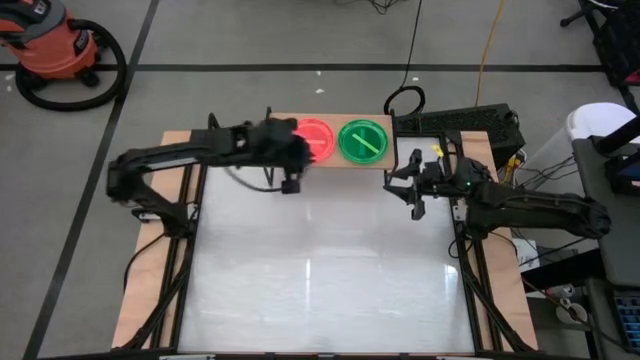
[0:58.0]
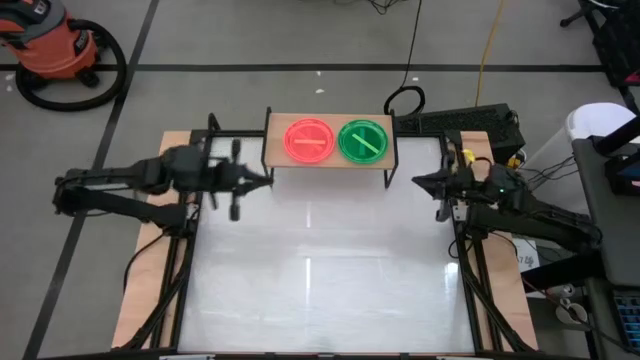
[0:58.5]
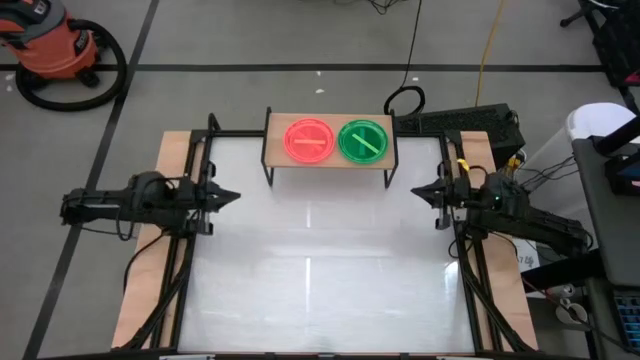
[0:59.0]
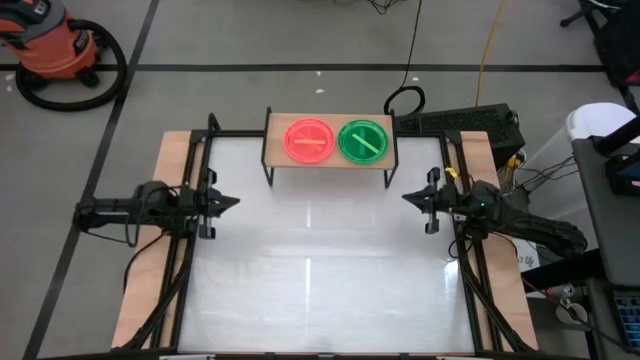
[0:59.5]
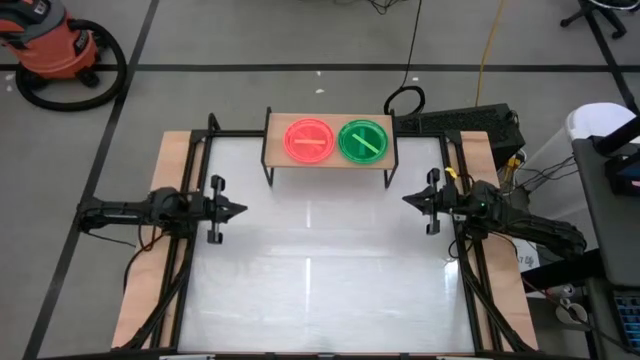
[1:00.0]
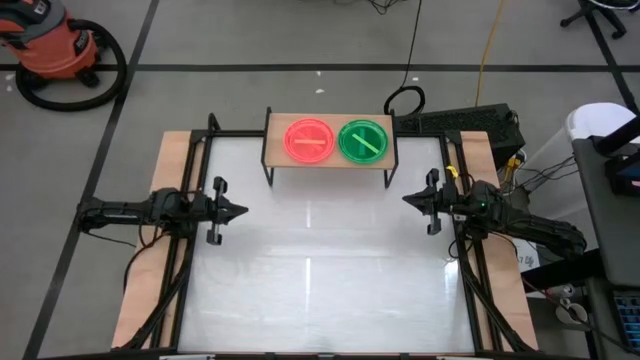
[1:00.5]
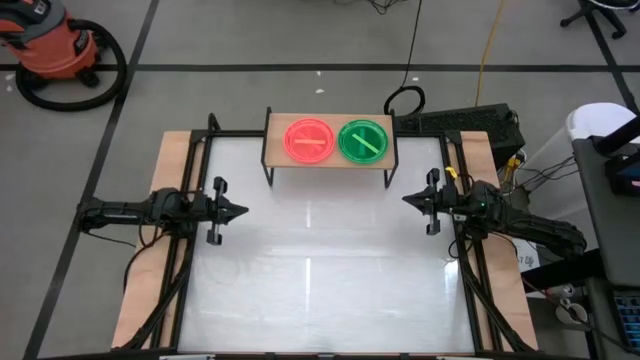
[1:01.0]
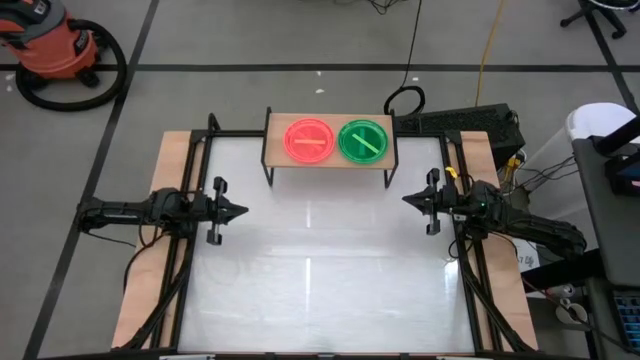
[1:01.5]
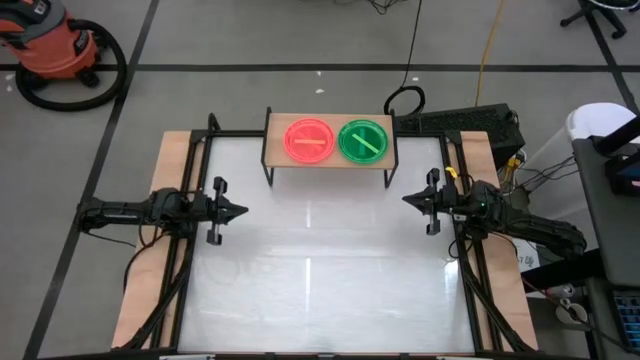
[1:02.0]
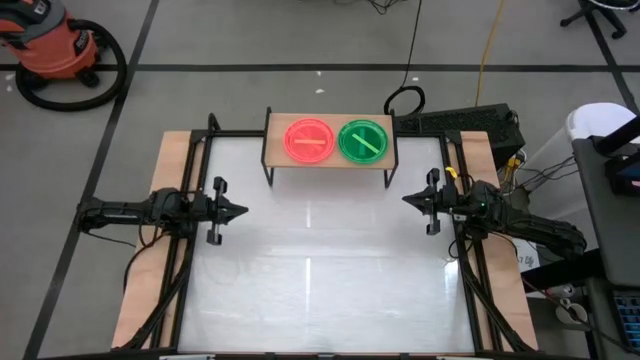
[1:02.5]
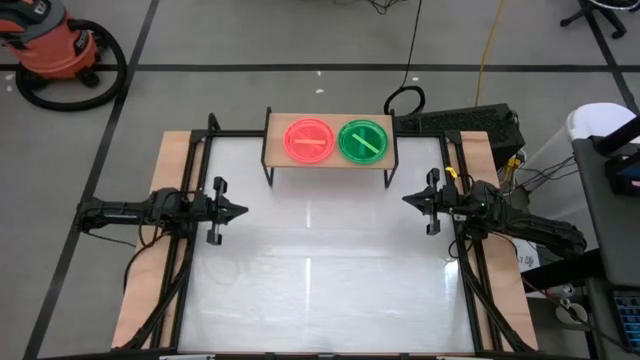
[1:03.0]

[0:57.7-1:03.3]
Task: Place and stack plates onto a shelf
Return to Home Position

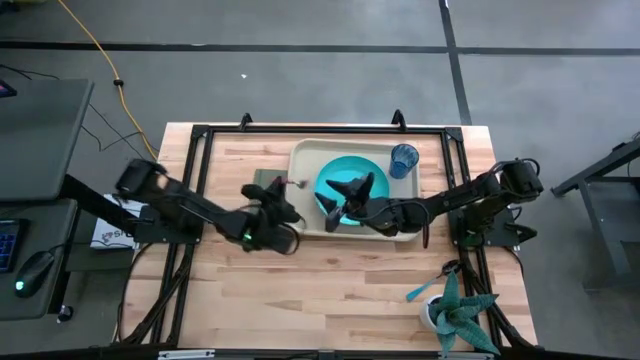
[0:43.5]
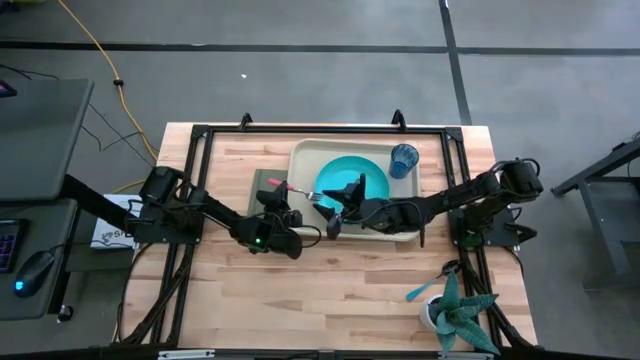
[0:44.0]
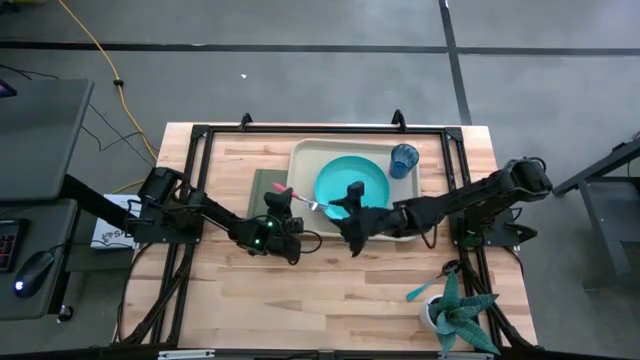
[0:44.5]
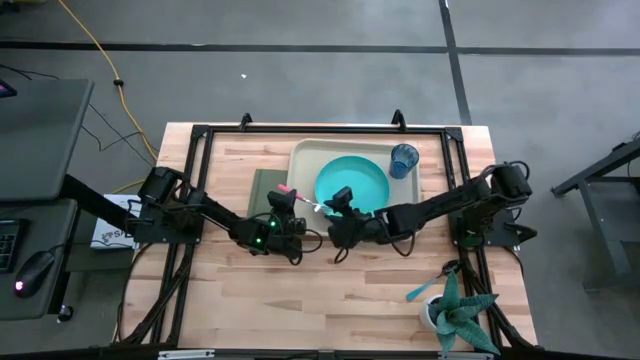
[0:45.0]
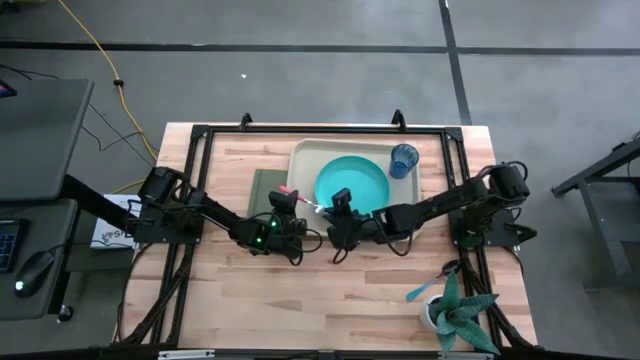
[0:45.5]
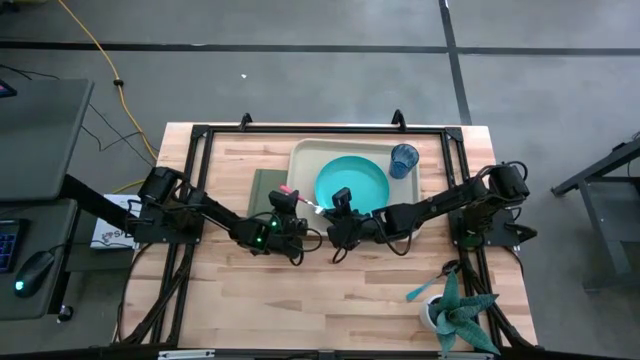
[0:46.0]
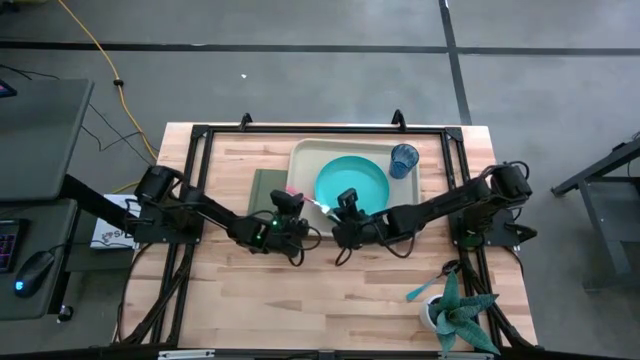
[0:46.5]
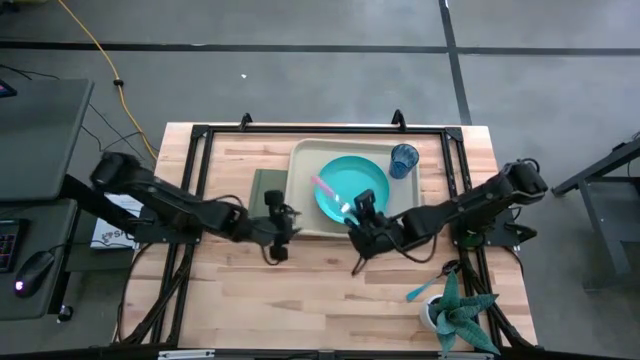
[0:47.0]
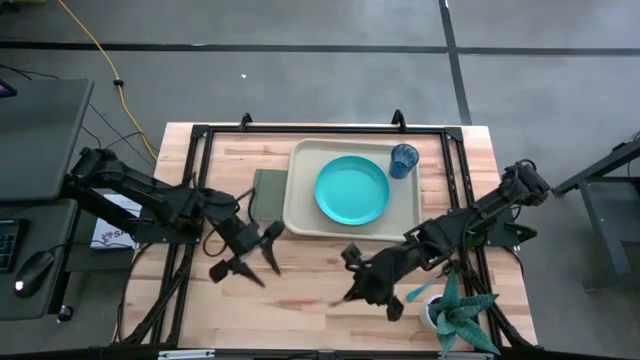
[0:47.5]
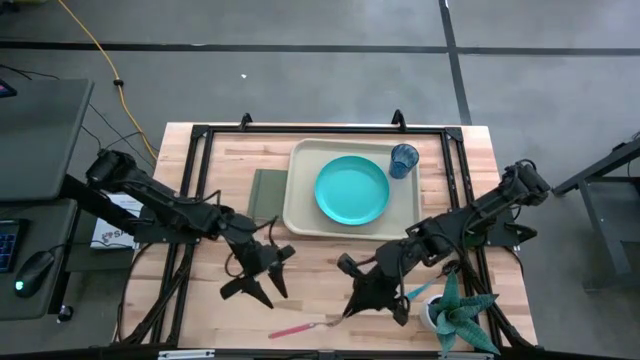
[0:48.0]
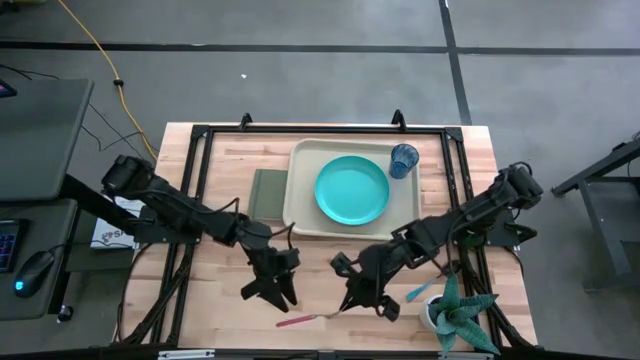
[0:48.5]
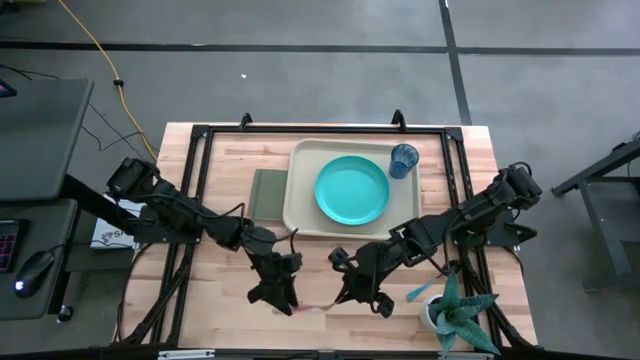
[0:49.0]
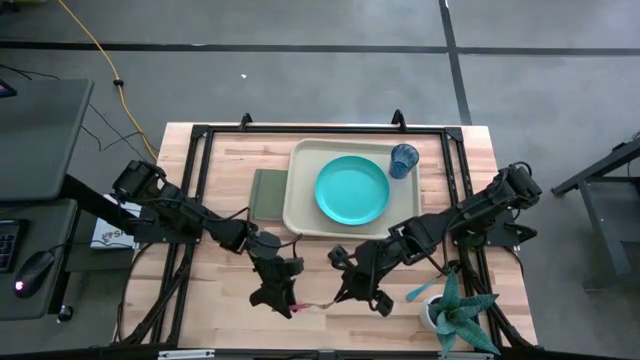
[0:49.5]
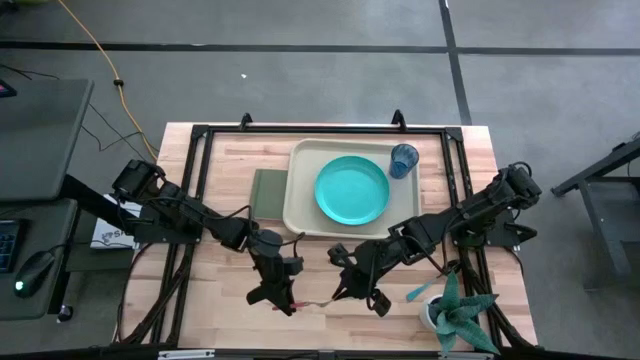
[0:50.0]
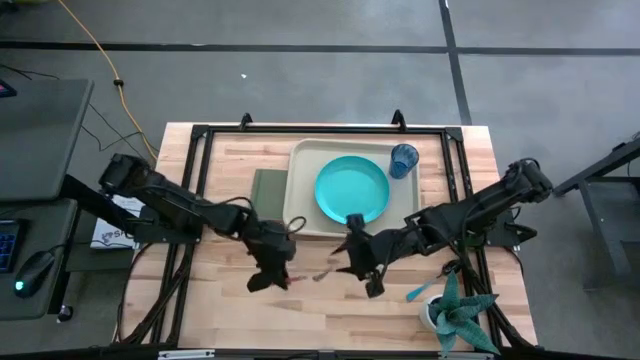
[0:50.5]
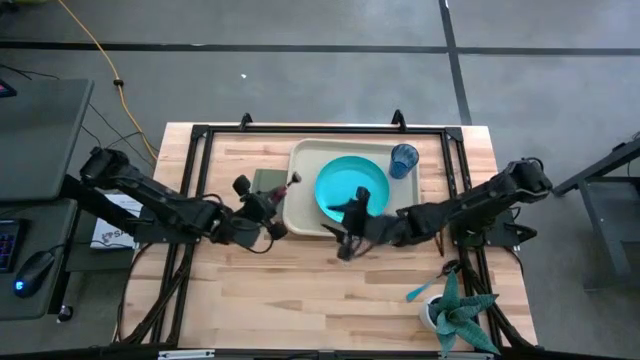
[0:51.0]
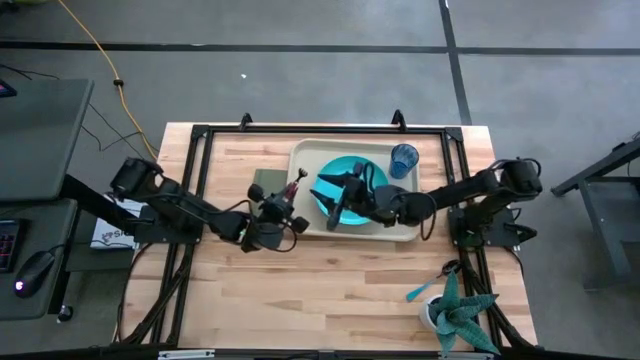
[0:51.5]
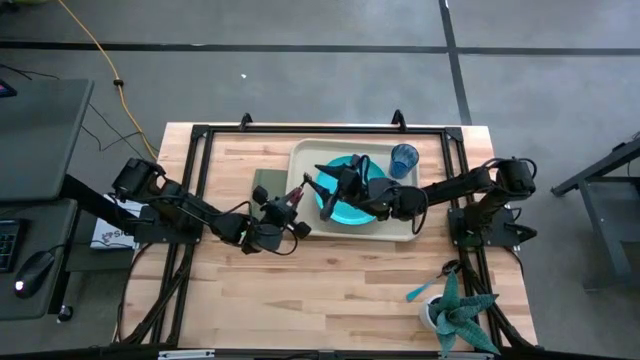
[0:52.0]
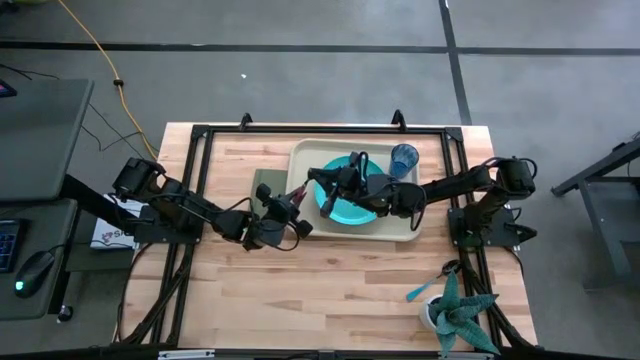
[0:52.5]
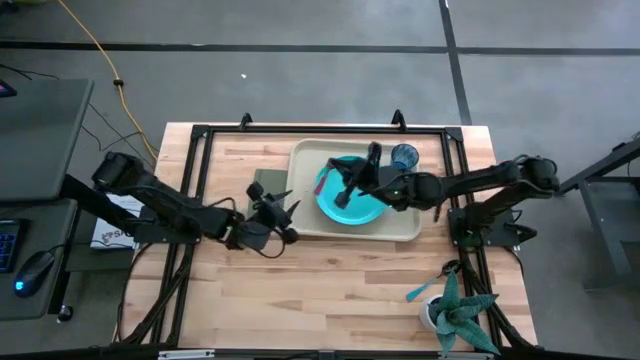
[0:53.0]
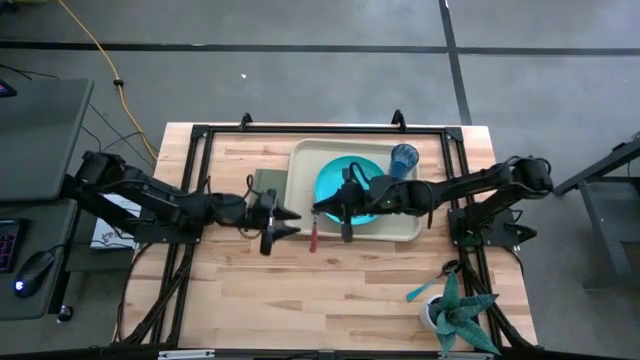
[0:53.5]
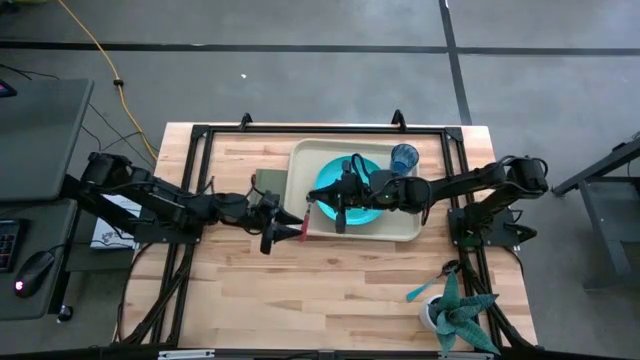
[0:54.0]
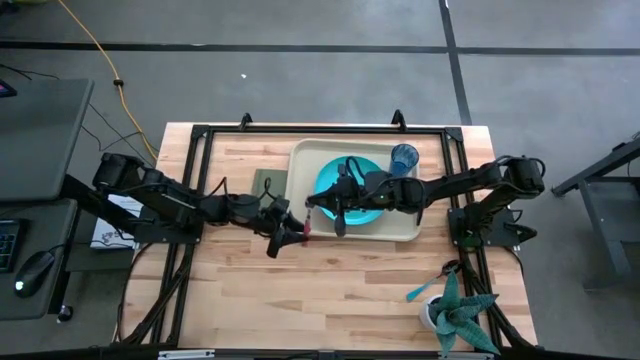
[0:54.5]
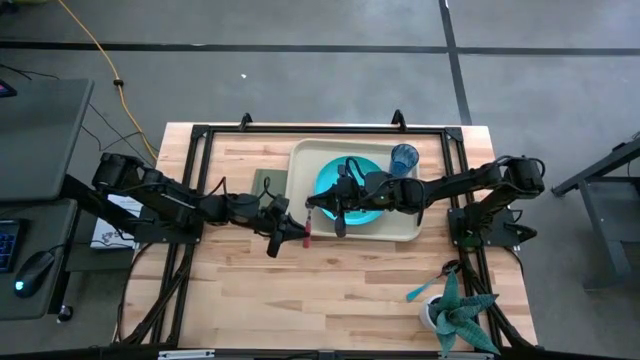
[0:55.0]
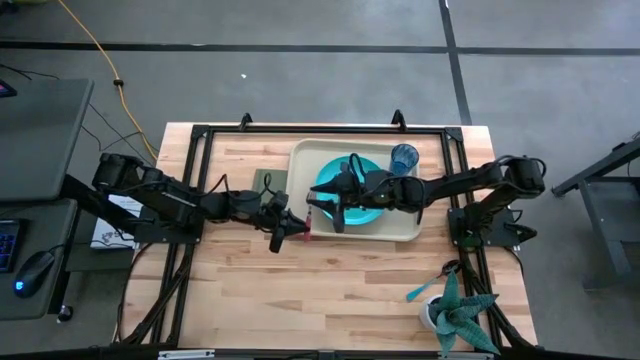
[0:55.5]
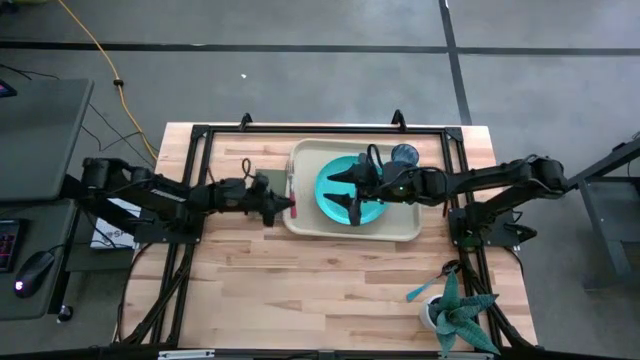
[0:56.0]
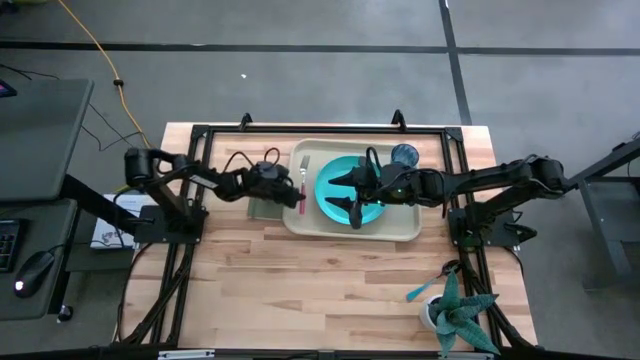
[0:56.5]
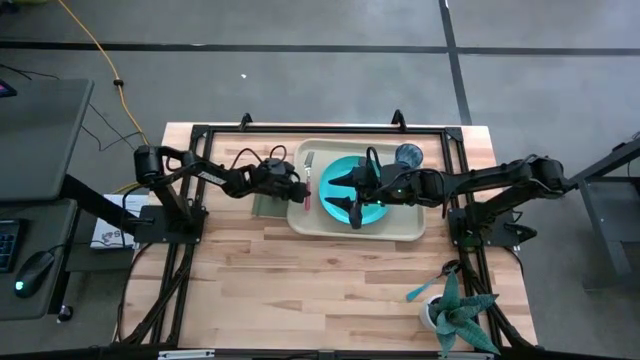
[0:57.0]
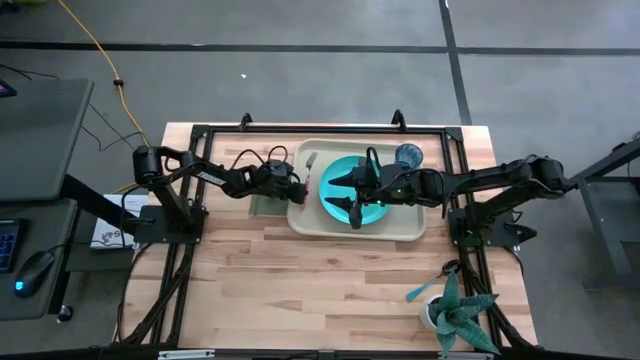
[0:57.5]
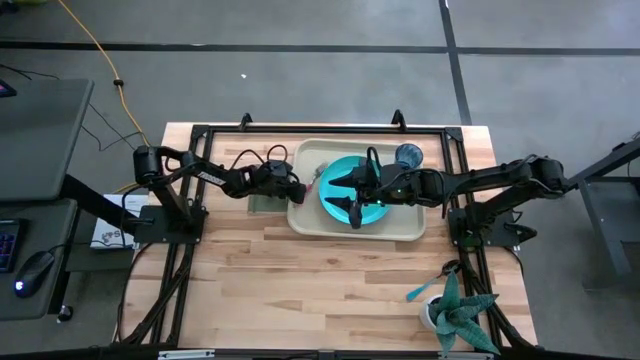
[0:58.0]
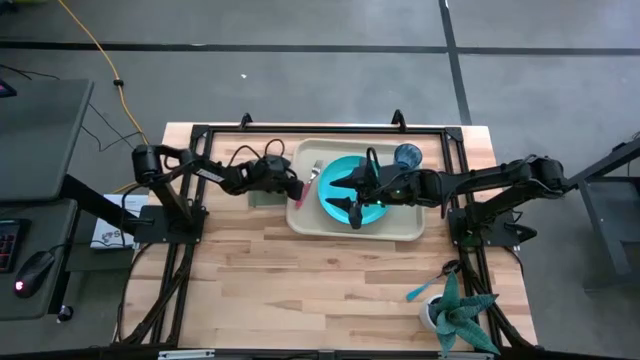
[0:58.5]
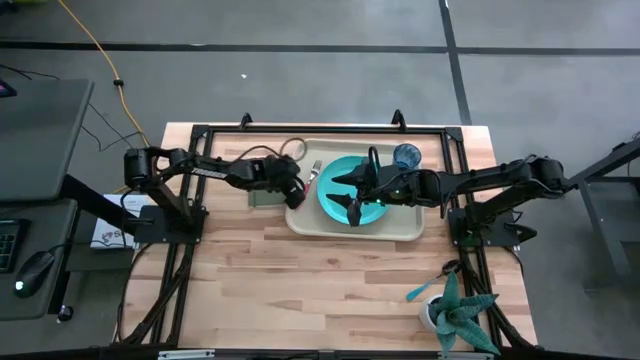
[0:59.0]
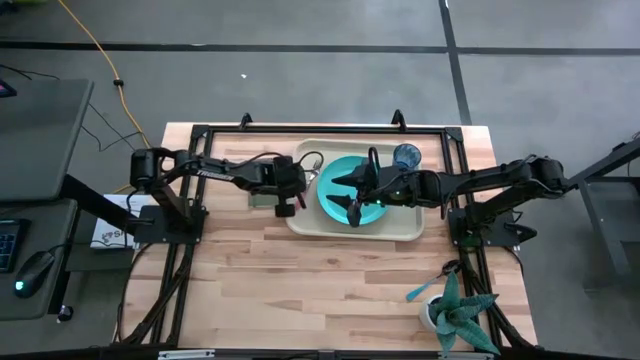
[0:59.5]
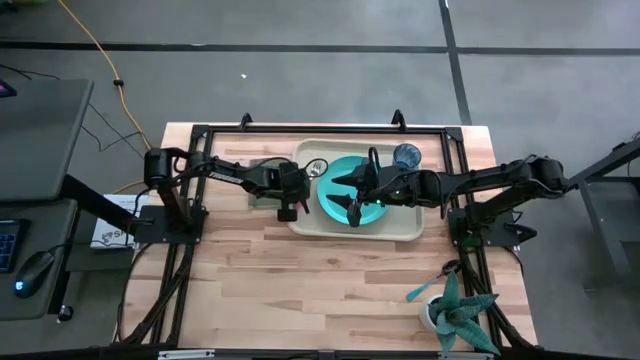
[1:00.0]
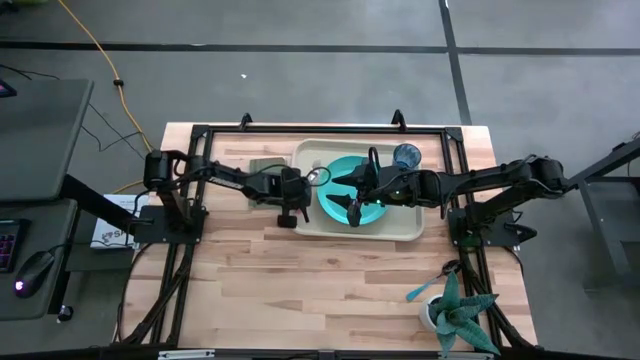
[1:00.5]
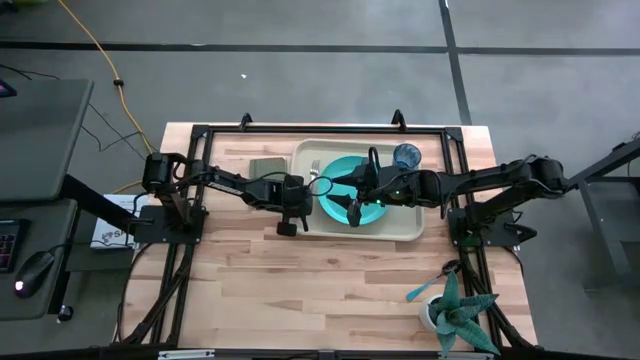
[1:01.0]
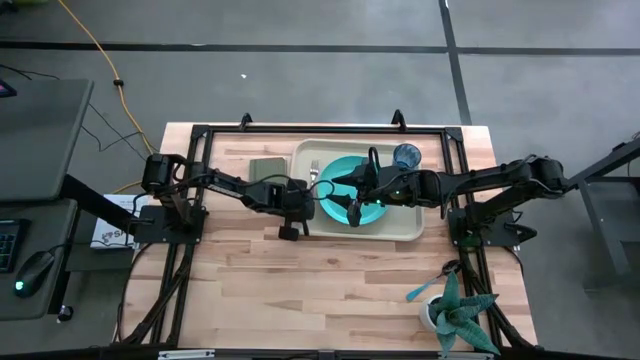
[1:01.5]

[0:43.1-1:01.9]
Task: Pick and place plate/cup/fork/spoon on tray
Put the pink fork on the gray table tray to the left of the light blue plate
